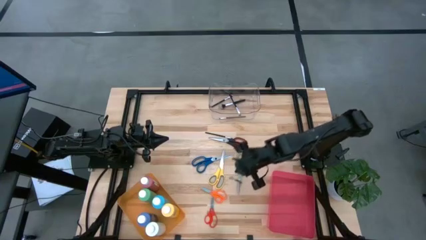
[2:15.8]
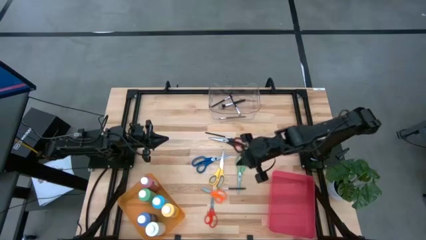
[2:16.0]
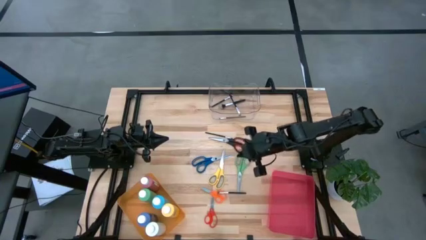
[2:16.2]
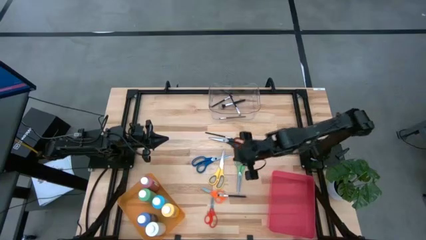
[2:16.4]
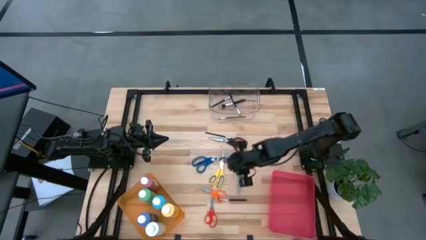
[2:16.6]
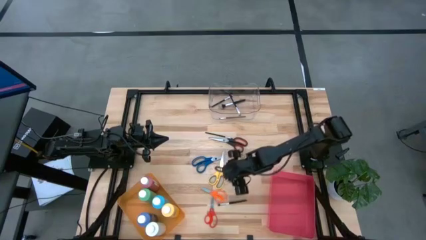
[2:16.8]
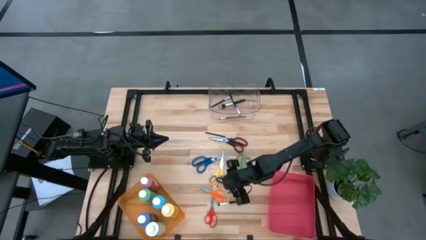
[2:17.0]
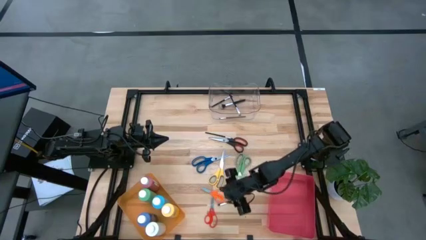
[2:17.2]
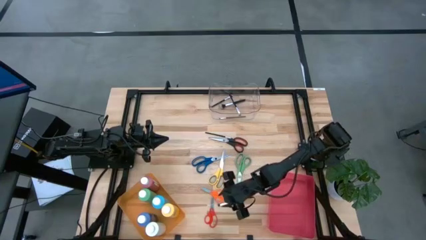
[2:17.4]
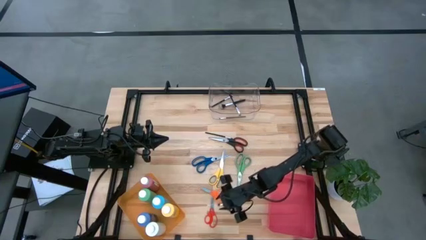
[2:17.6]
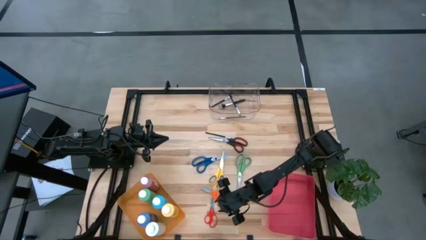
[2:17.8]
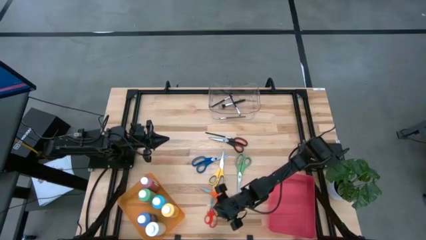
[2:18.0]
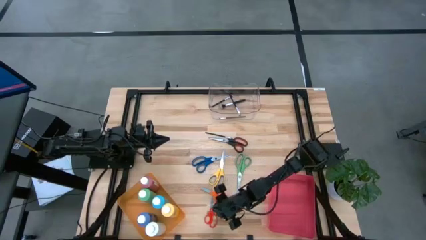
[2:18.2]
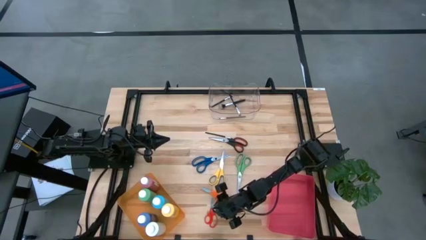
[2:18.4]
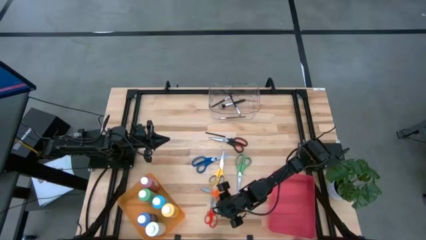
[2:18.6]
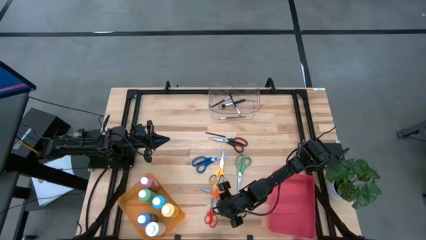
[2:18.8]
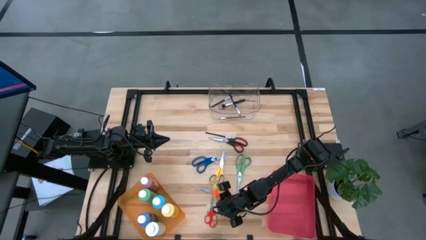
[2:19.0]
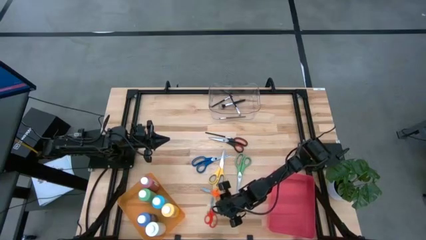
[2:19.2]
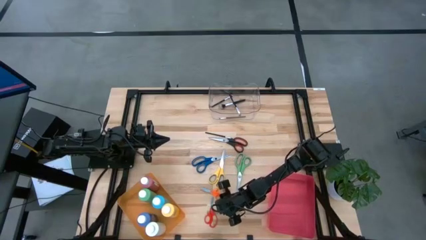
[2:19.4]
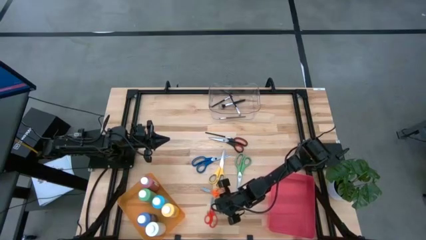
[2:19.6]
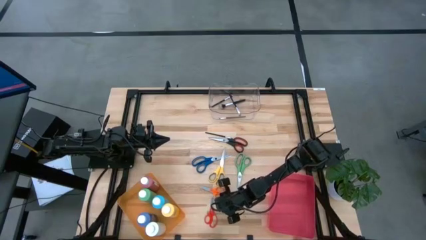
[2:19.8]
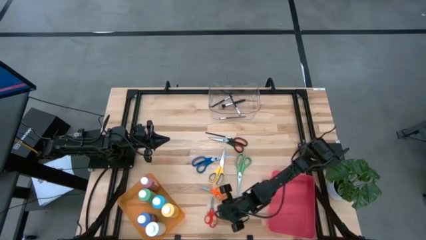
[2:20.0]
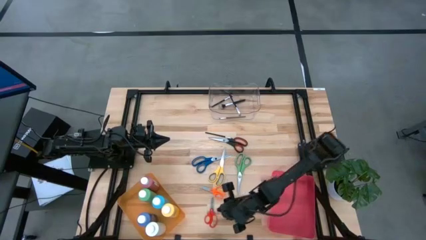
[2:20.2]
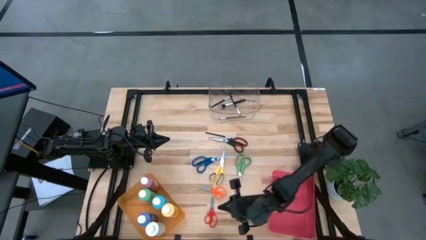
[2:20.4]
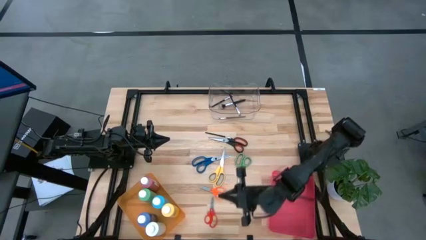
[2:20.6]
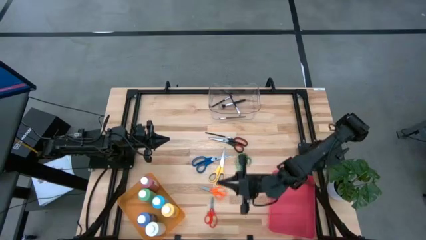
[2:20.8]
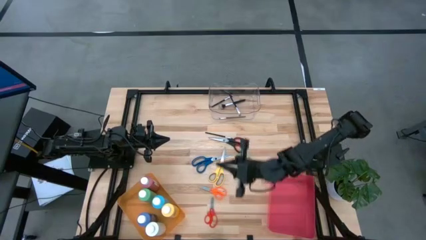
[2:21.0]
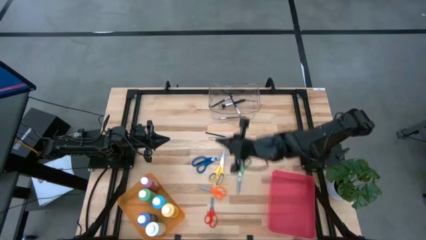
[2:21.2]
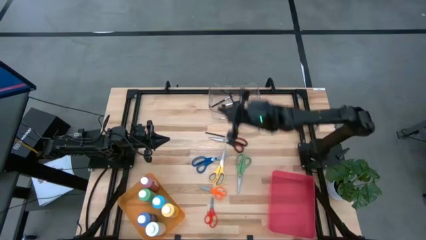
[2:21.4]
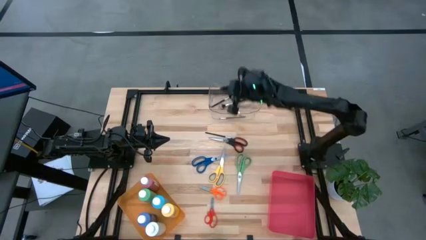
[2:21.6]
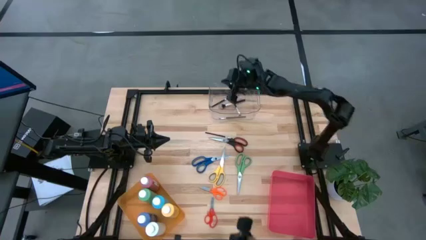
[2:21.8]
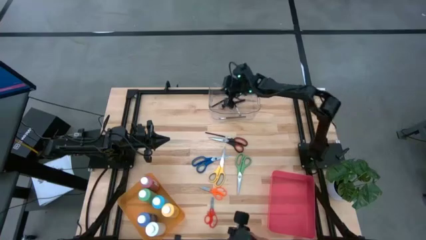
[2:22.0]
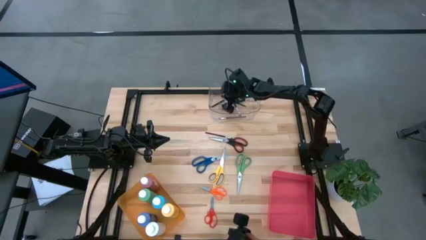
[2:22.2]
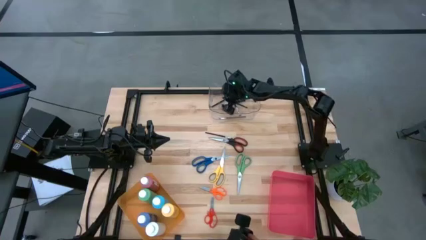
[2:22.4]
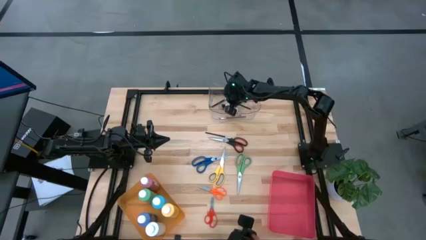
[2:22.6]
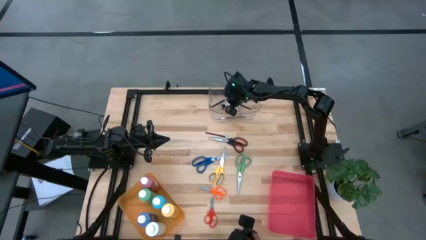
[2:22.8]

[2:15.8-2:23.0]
Task: Pick & Place Paint Supplies
Put the eyeshadow brush into the transparent bin

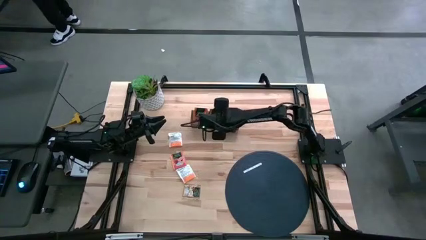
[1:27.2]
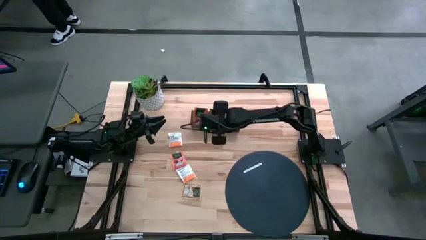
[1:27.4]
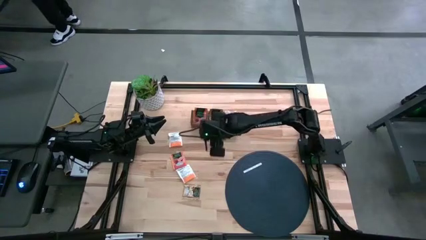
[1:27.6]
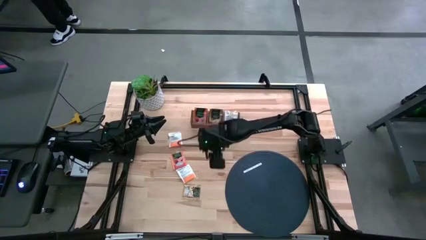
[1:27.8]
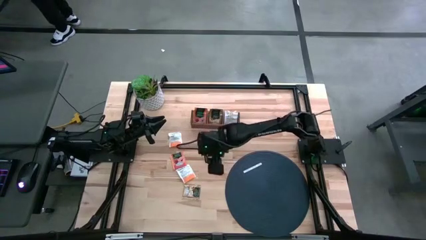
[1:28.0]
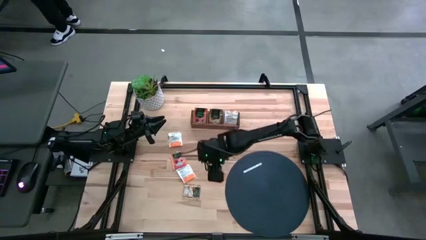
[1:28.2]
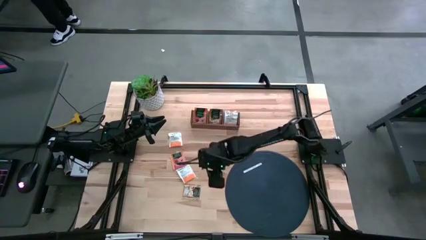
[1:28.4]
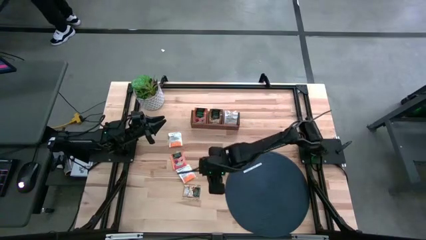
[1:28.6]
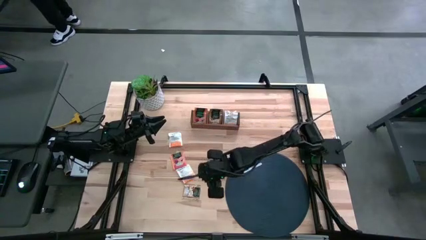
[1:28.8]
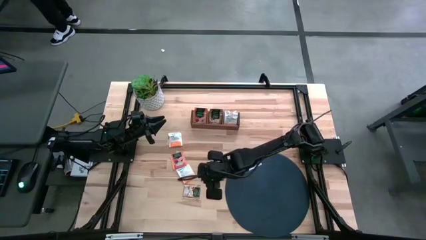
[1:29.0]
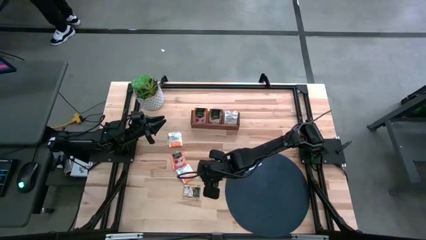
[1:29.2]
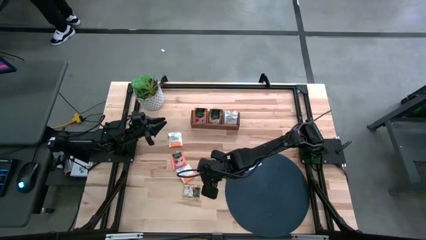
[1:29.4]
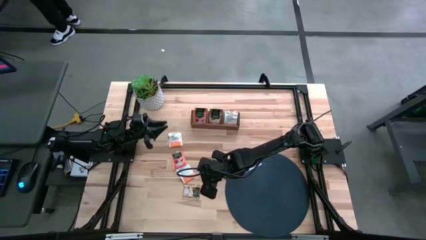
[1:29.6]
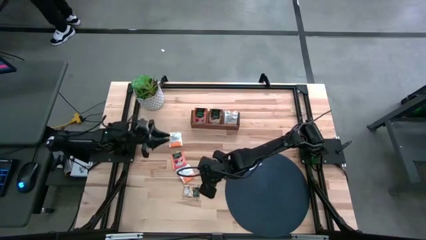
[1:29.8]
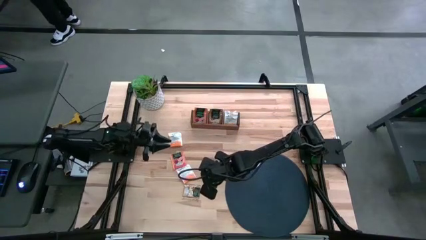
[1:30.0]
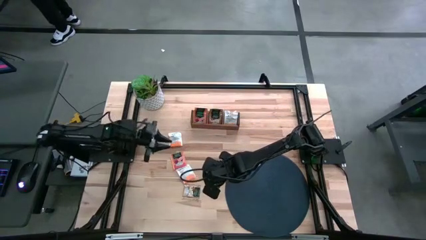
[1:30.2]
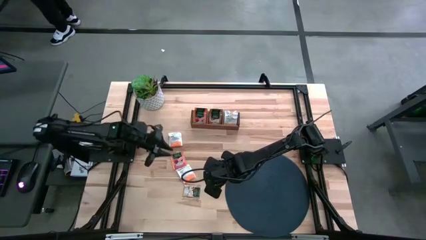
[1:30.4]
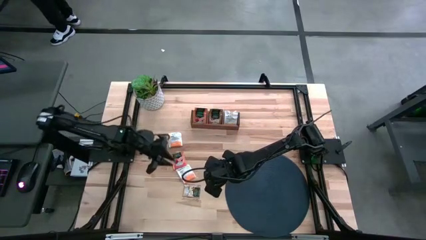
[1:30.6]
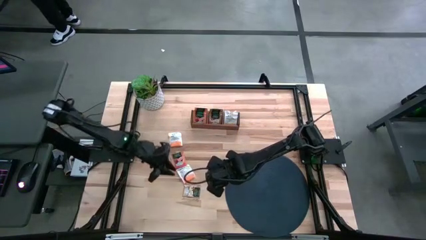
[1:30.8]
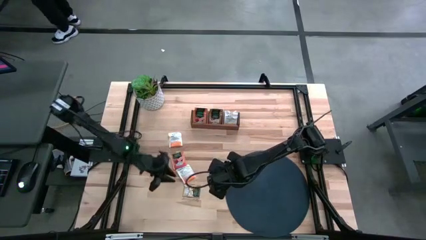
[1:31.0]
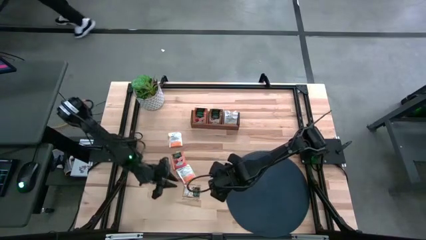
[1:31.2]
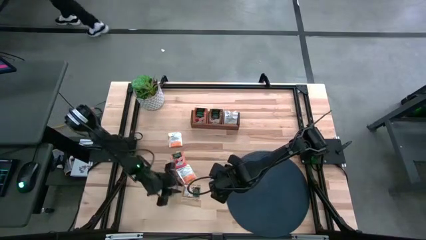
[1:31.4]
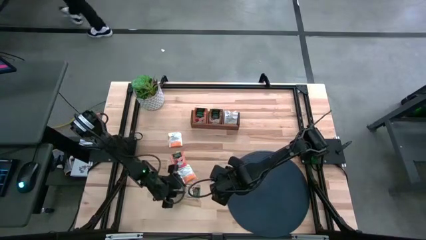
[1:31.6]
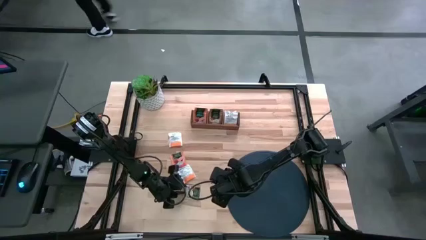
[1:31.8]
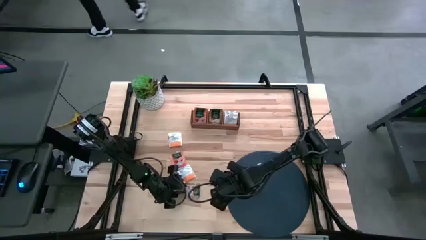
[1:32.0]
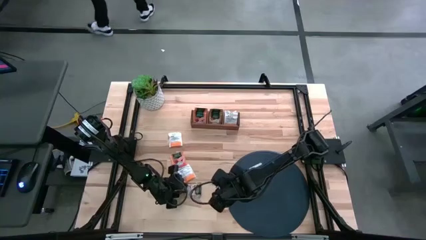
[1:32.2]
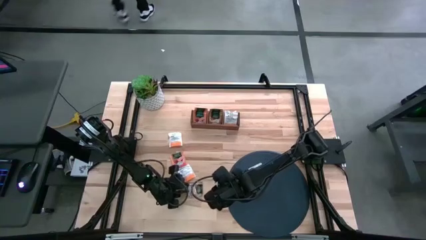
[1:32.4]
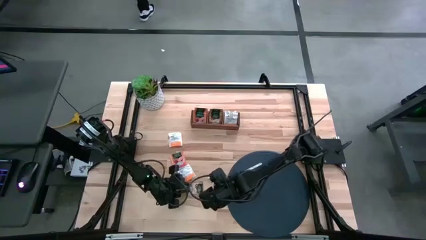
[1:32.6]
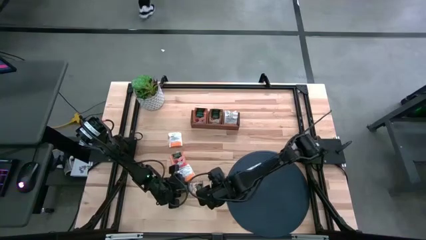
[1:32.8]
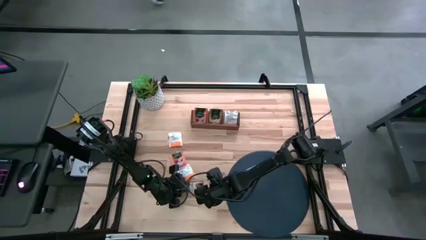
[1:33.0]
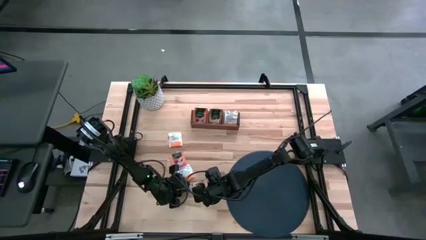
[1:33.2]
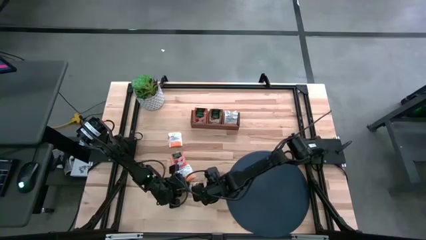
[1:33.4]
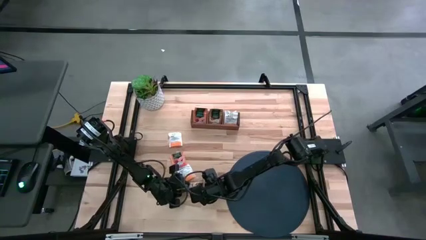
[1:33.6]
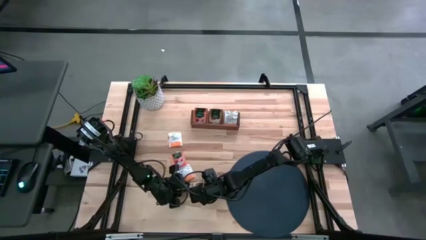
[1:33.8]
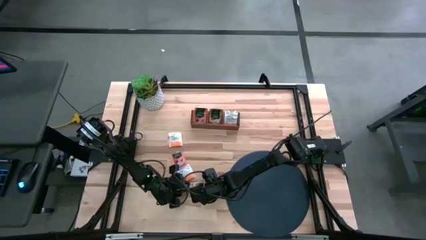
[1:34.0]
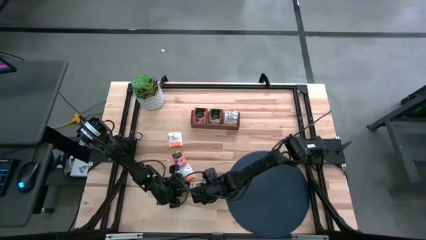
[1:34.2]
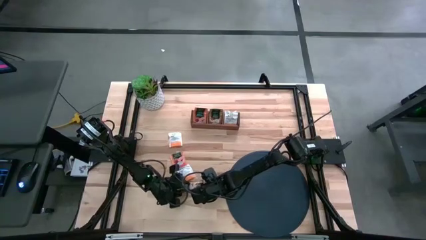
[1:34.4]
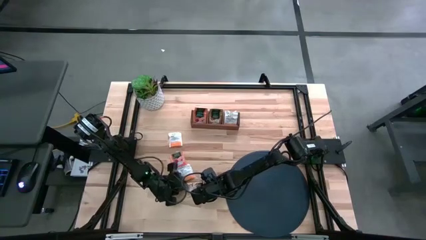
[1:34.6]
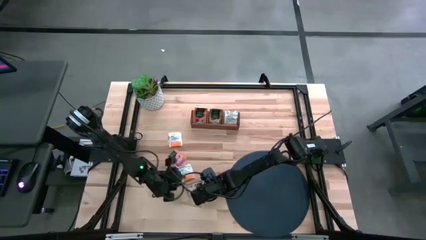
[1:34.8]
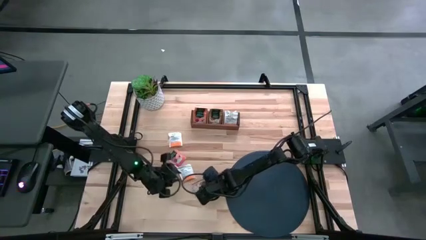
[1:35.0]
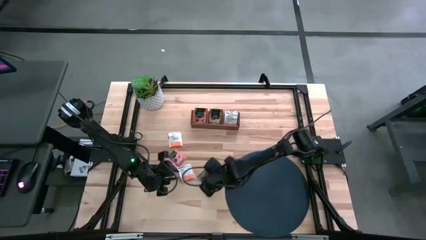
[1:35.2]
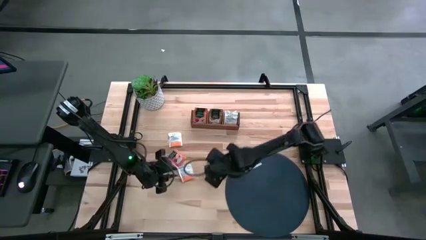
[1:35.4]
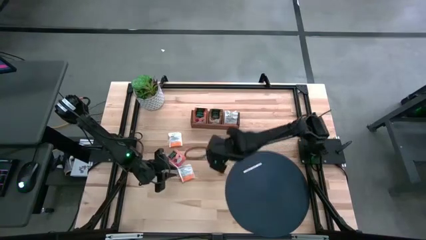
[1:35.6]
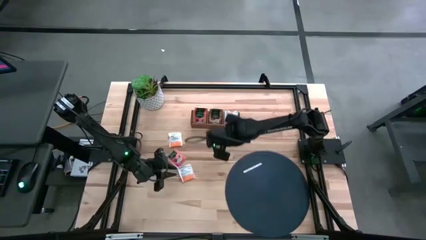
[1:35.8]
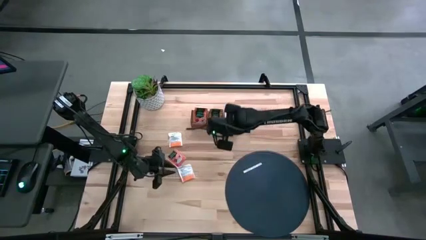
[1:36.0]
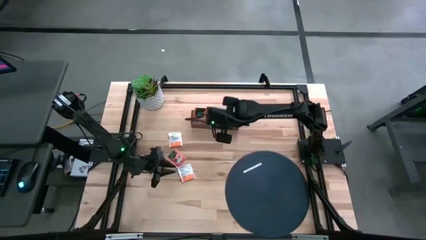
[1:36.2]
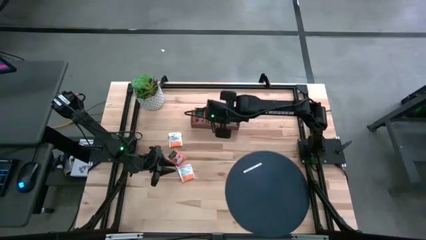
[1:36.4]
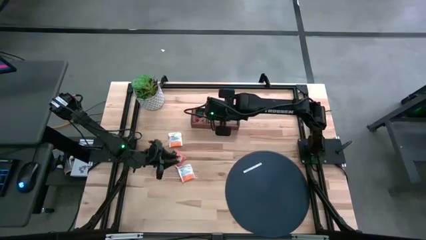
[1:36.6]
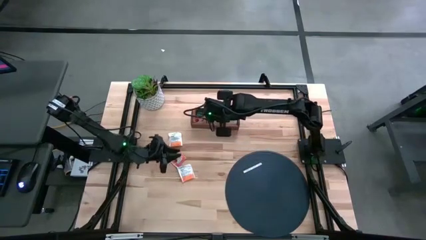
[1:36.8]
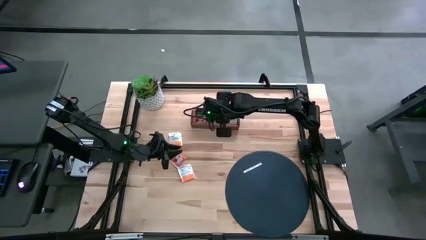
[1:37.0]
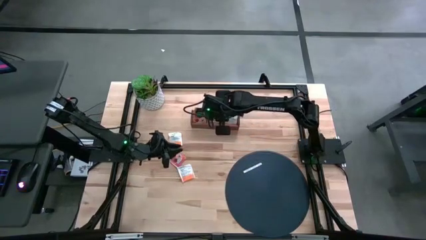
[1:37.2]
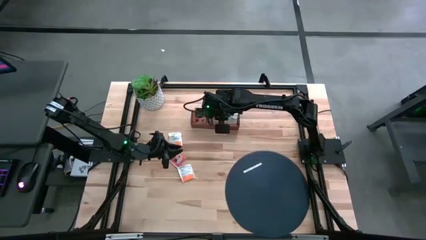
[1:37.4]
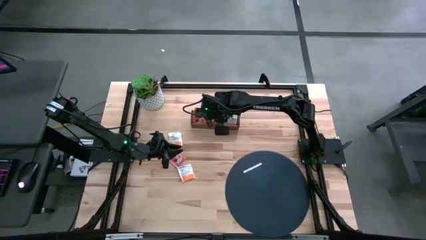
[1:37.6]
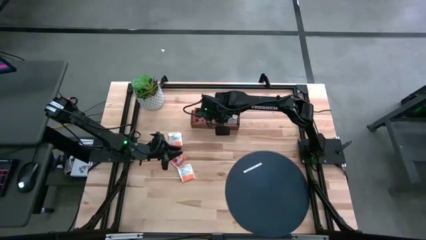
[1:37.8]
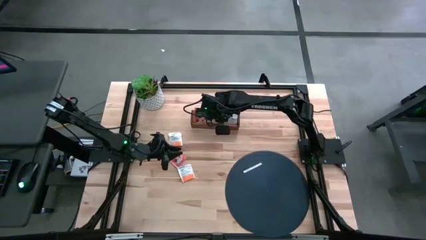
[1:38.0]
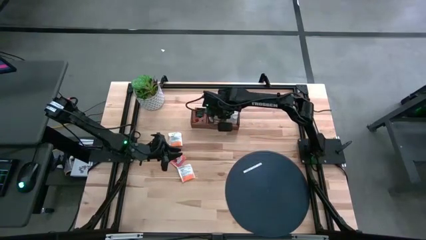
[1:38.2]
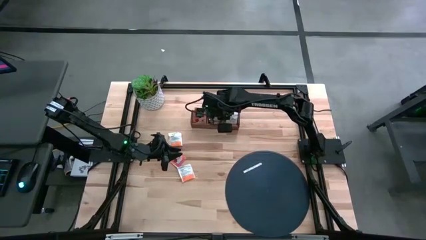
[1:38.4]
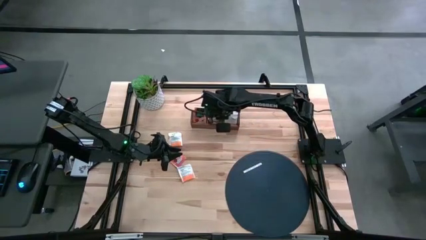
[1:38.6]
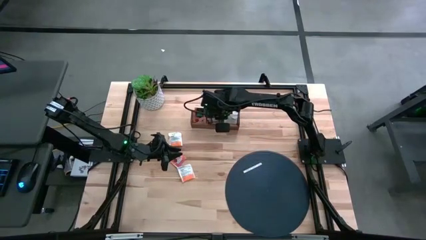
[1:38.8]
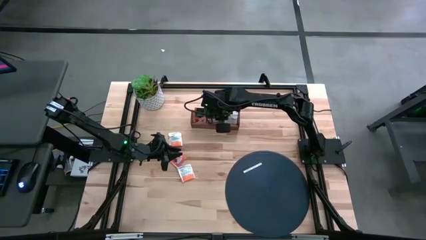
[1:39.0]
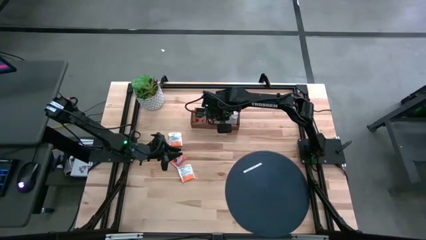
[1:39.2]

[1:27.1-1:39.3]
Task: Pick & Place Tea
Put the brown tea sachet into the middle section of the wooden organizer
